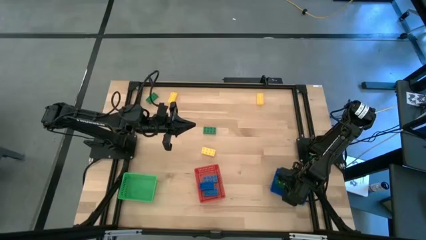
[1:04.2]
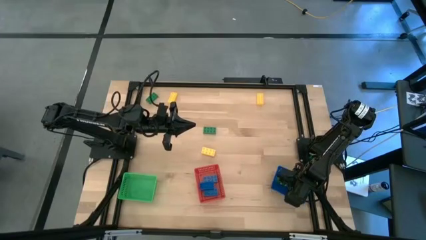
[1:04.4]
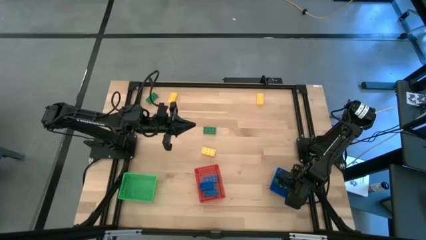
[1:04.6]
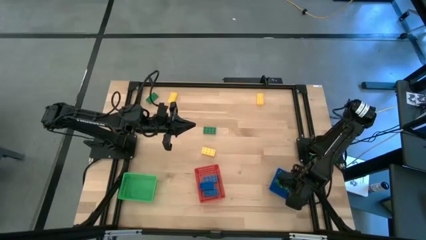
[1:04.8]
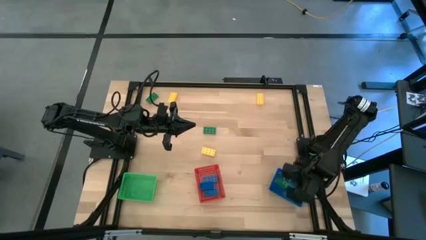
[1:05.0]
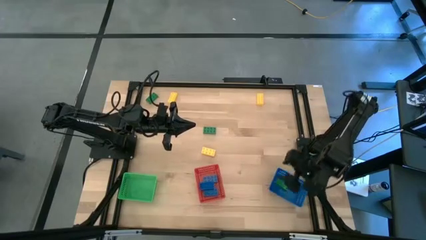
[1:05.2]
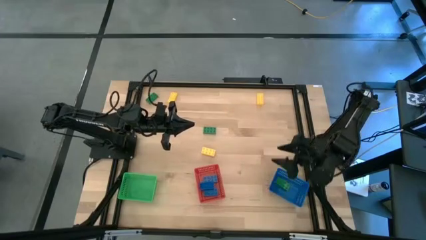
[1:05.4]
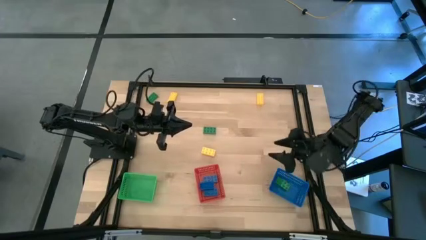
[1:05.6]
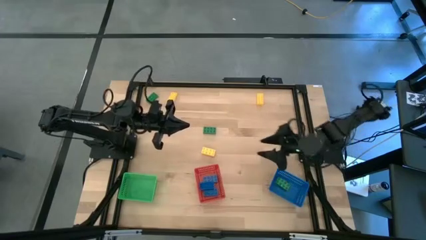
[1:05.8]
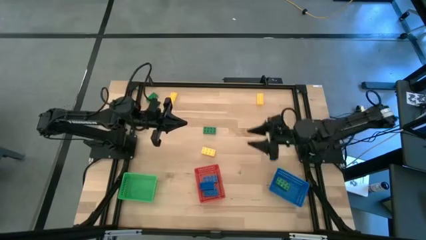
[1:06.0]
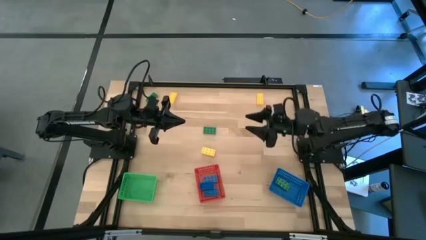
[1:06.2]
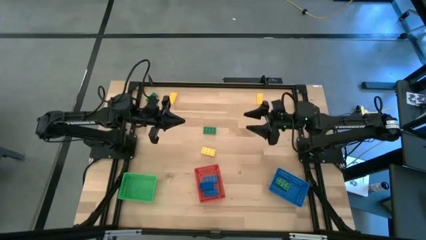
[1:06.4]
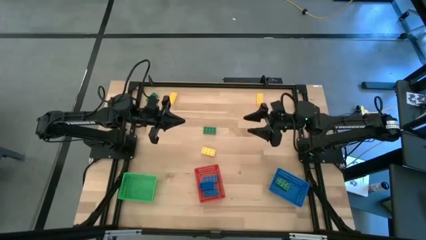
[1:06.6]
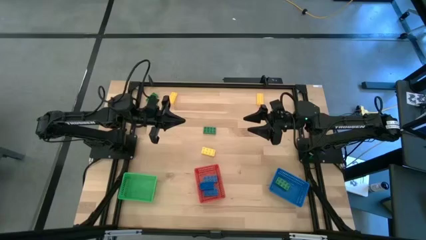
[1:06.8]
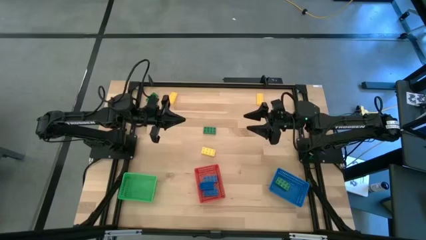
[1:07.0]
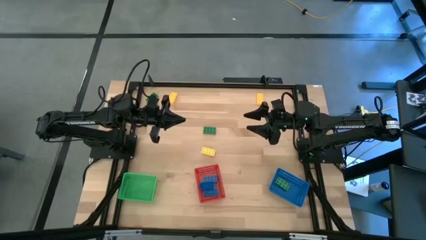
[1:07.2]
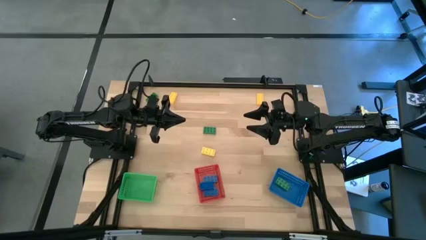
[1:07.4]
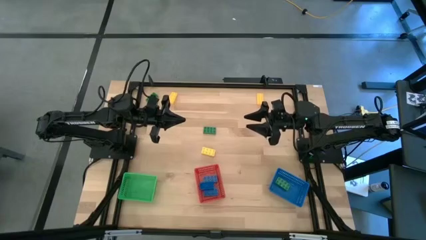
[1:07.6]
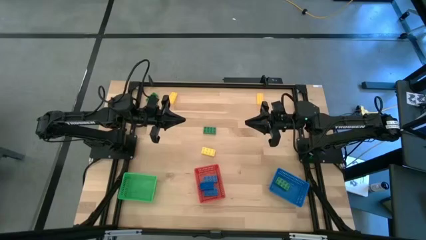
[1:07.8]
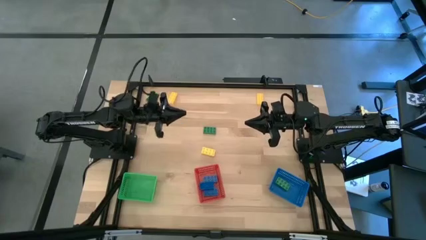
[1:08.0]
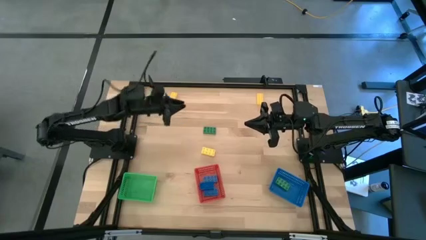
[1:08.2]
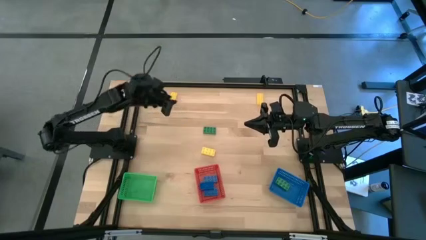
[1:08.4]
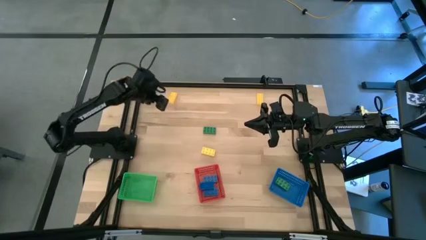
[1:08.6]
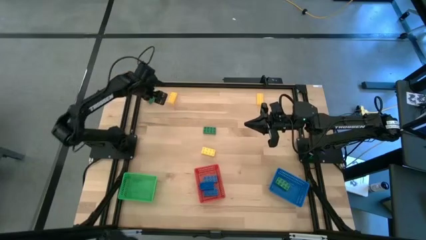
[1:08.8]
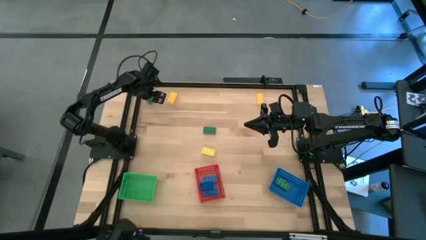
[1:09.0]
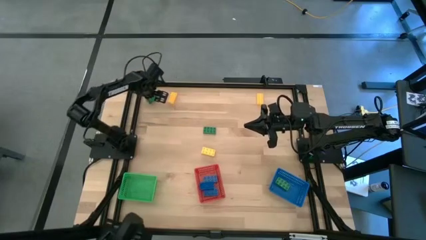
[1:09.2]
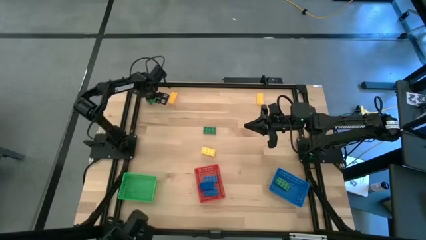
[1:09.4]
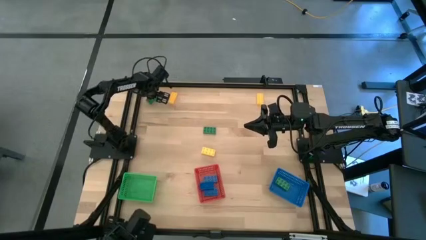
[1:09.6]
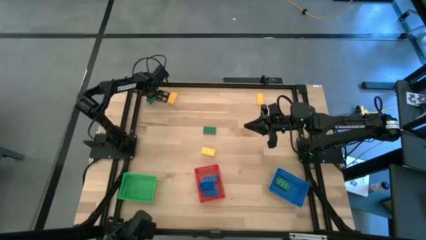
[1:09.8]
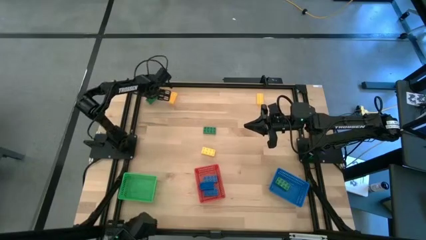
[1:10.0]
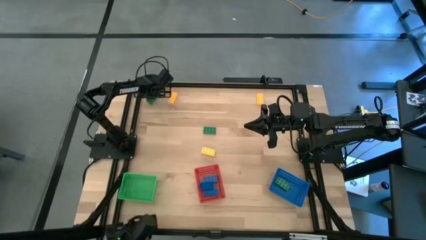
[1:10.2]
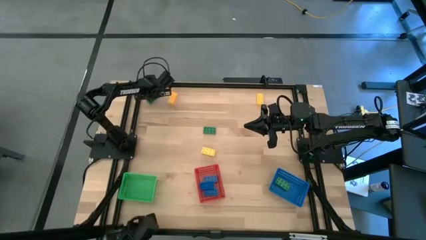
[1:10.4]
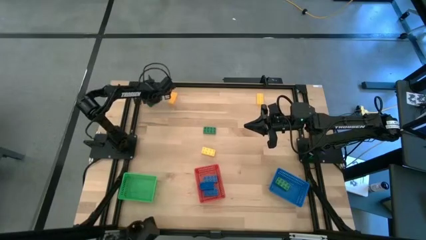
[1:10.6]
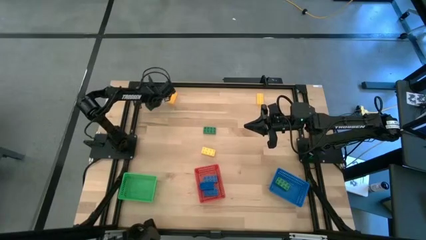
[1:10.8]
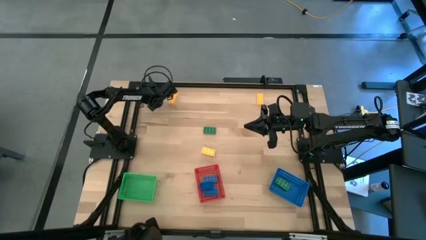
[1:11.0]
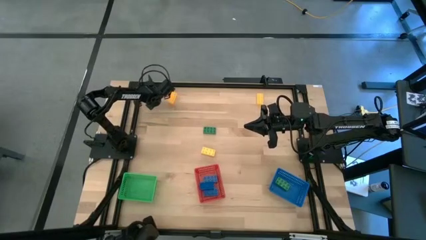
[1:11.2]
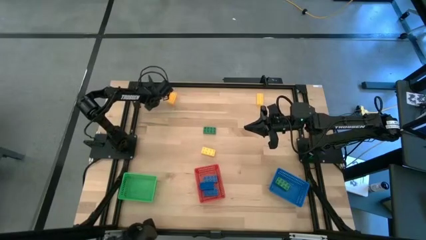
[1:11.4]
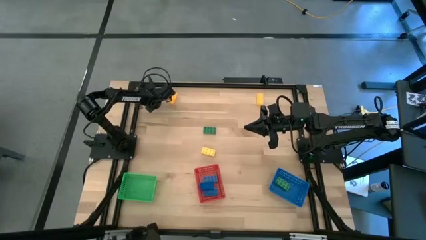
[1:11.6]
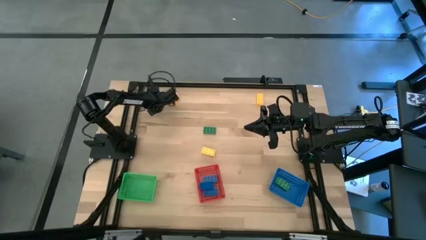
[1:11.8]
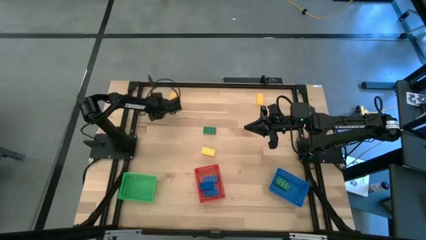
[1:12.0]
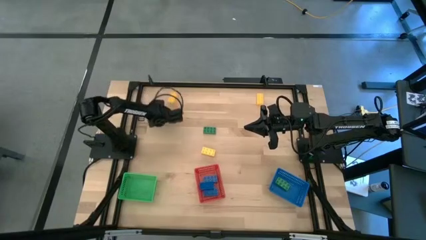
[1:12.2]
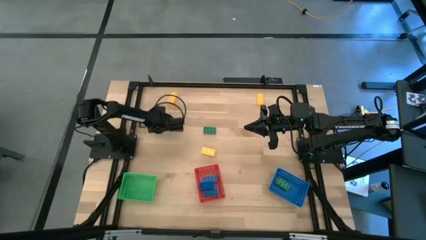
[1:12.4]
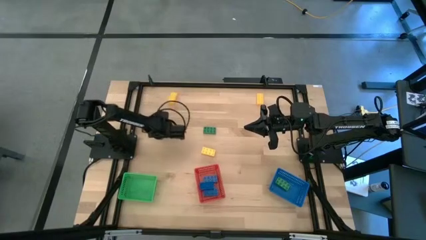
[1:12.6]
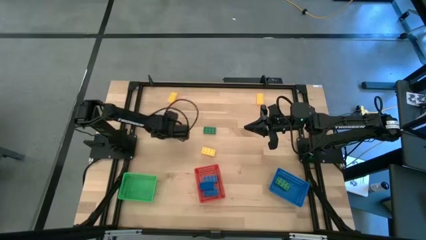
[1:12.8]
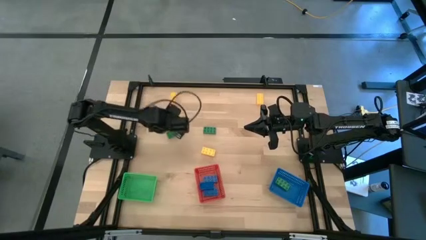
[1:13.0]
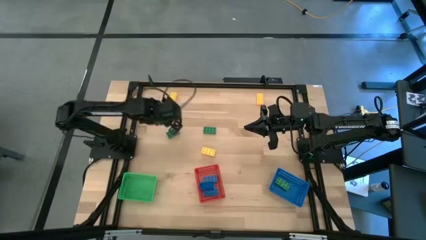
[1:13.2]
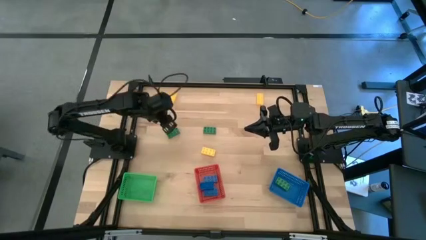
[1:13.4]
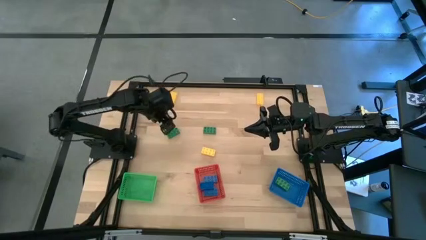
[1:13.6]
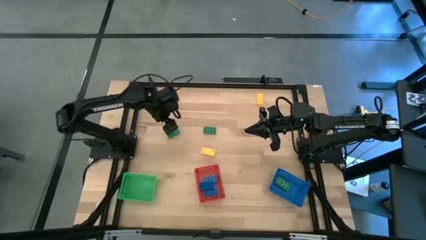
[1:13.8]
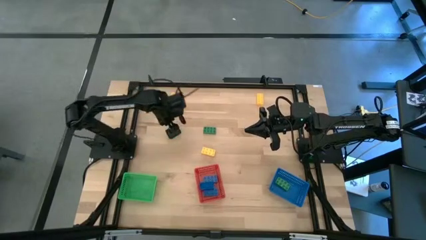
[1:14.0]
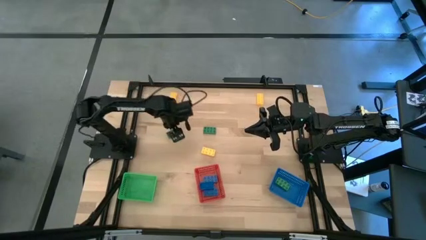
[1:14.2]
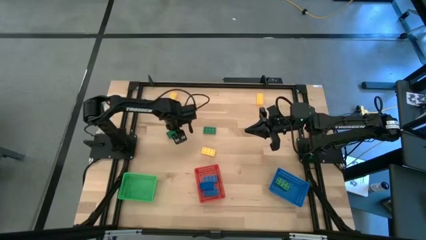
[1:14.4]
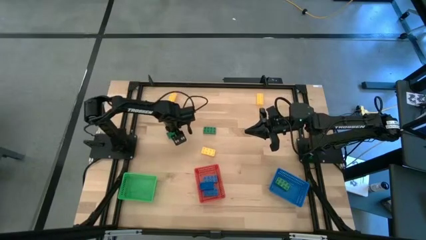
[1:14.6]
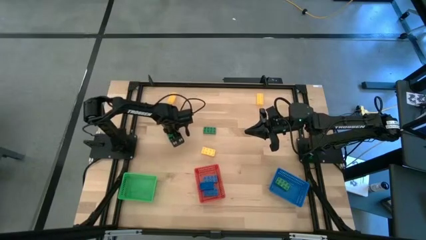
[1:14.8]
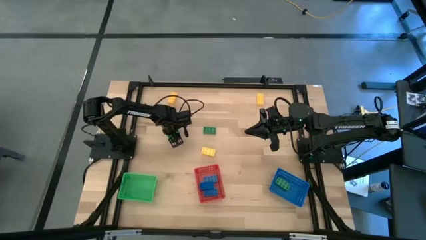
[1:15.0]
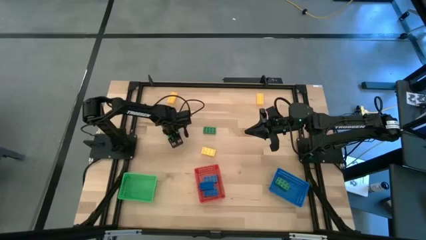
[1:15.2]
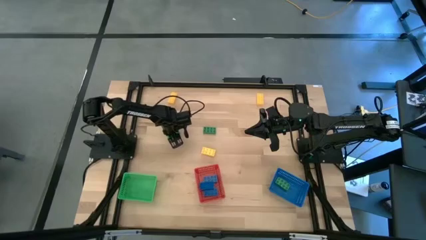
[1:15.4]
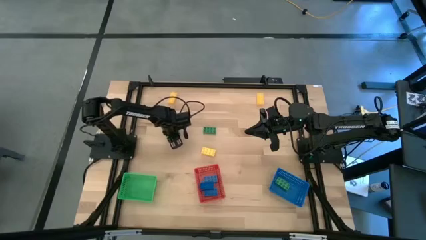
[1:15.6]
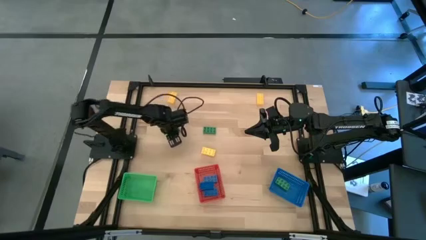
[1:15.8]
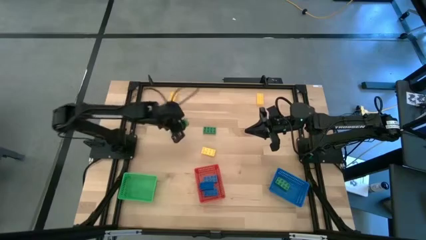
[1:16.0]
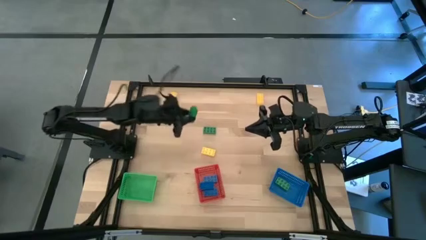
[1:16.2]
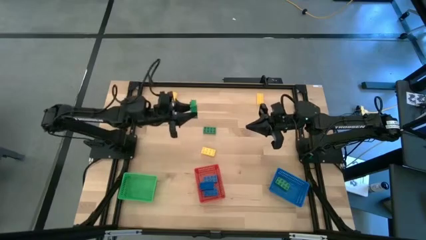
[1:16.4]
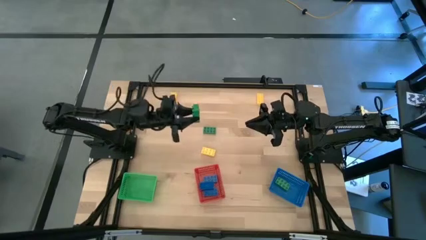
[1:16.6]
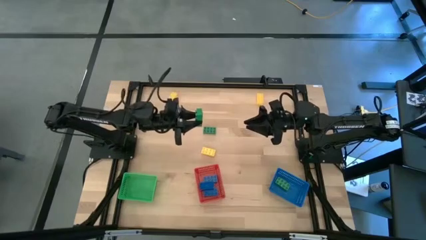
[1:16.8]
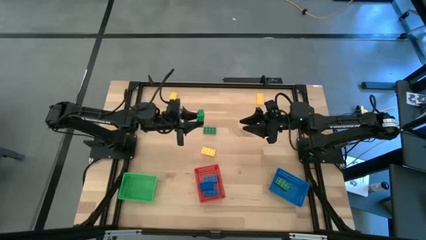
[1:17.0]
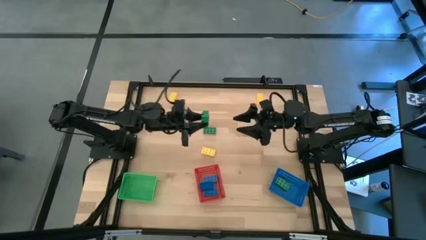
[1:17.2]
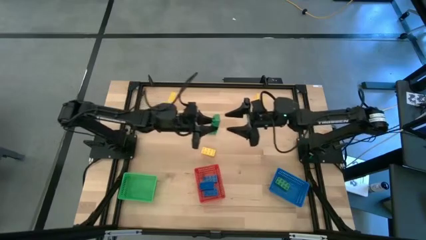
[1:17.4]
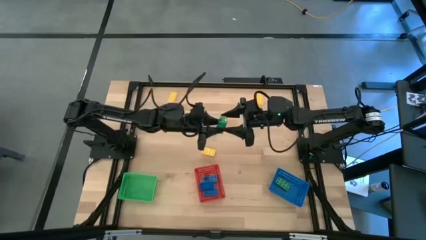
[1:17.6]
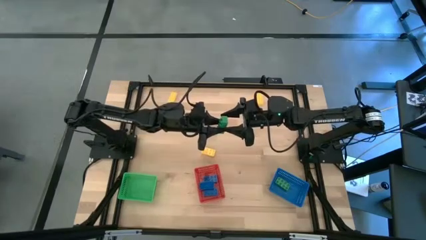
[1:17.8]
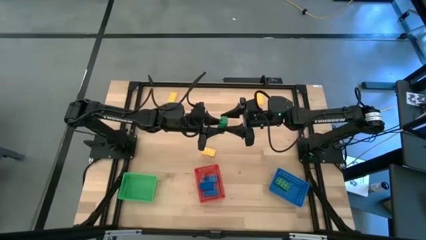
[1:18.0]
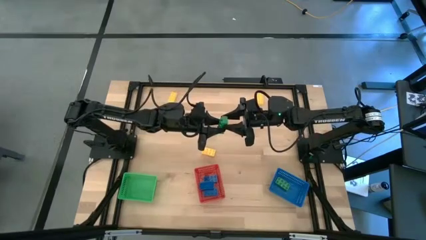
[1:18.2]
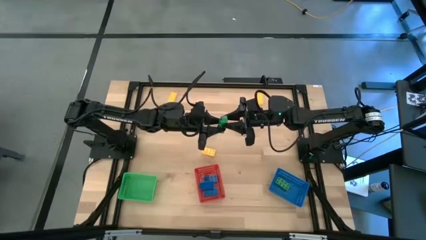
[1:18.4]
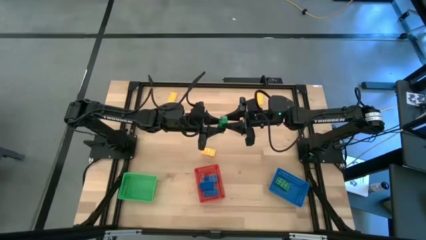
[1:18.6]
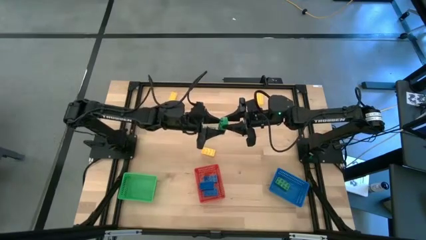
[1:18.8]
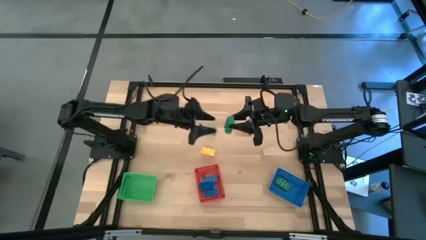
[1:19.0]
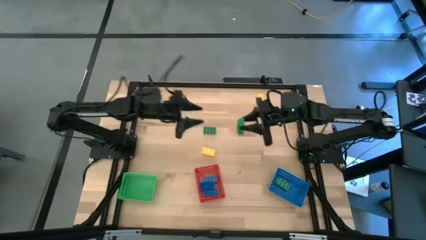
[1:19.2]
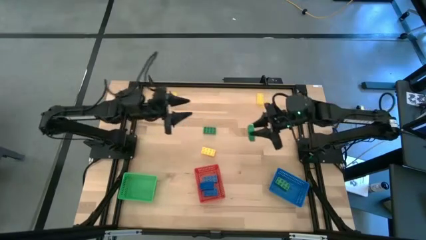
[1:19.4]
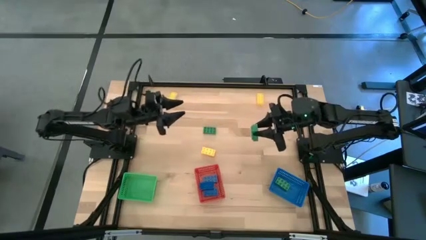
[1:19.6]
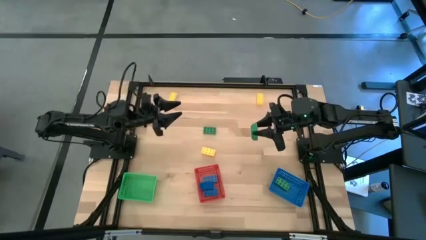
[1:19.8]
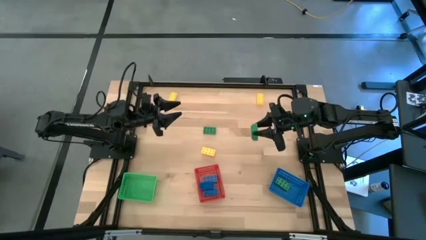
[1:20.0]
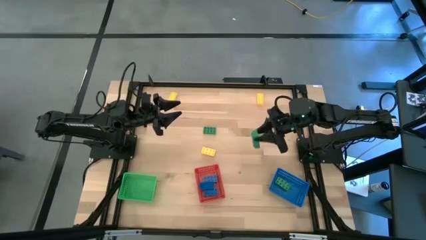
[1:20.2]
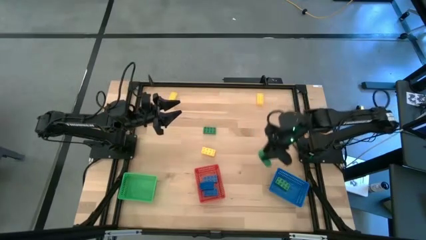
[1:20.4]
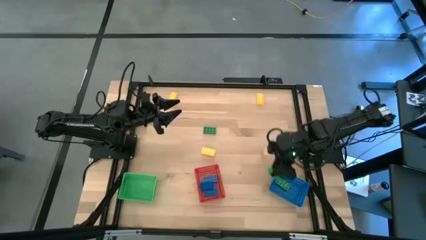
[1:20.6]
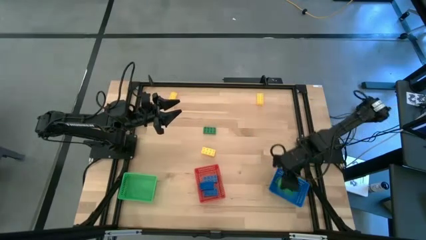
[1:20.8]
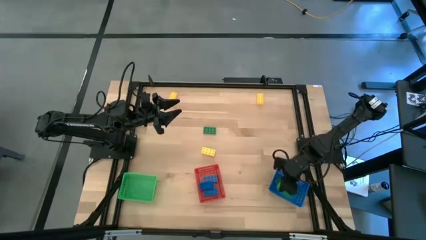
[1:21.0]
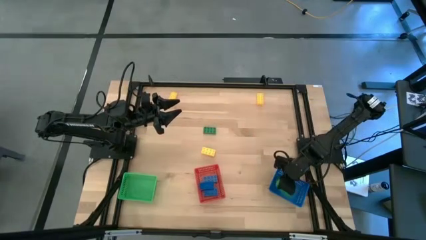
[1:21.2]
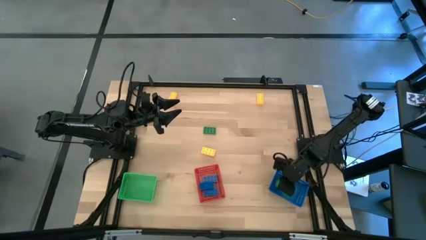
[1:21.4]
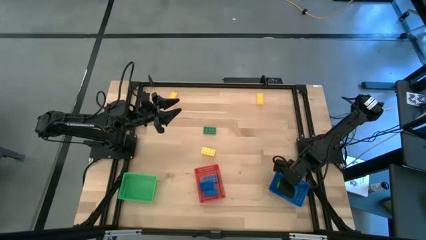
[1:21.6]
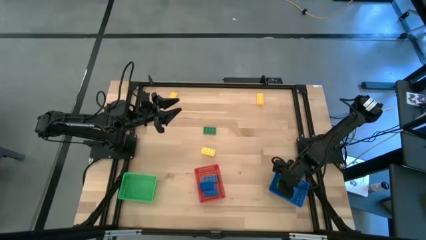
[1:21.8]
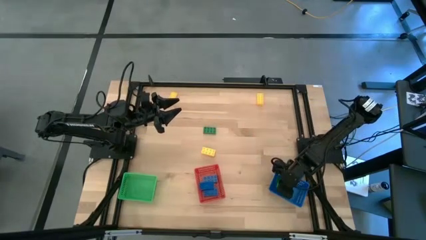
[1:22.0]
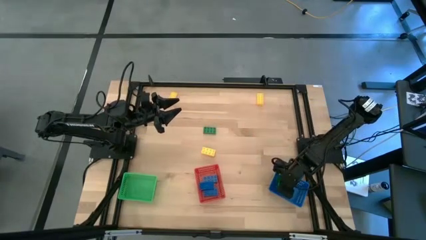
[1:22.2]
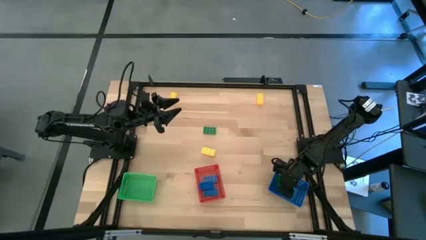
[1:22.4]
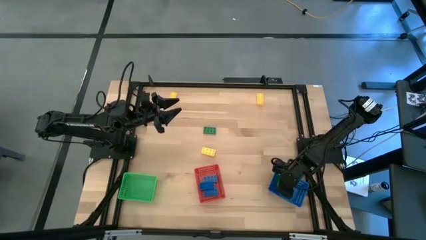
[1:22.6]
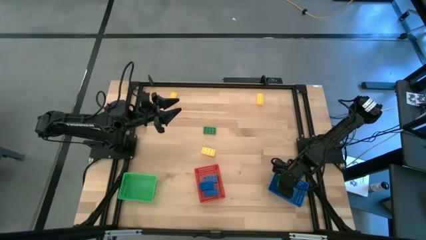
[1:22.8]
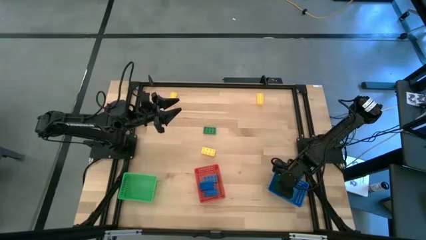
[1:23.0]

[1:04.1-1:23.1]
Task: Sort & place blocks by color
Put the top green game piece into the blue bin
